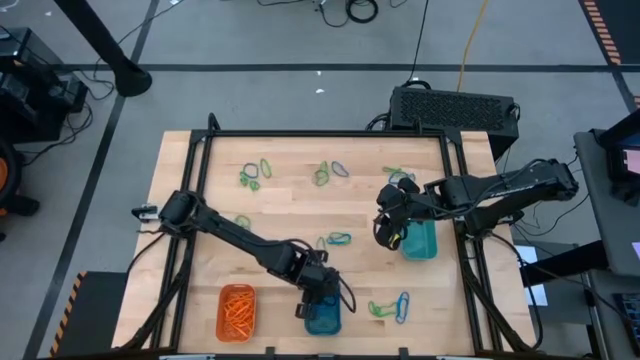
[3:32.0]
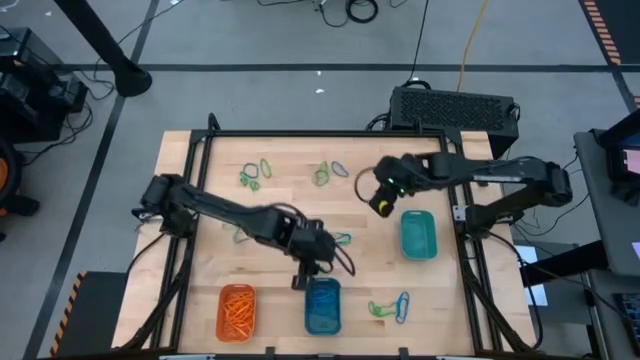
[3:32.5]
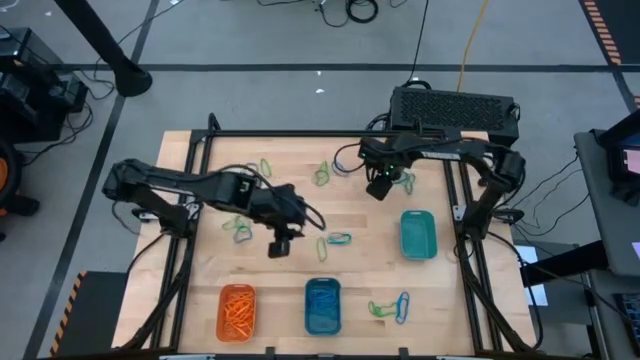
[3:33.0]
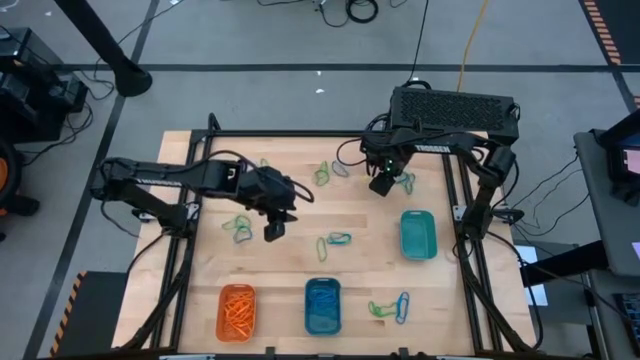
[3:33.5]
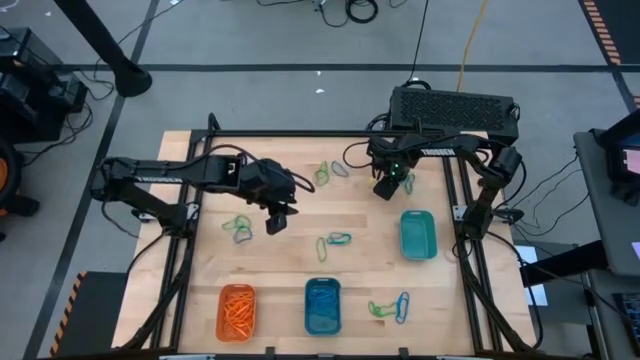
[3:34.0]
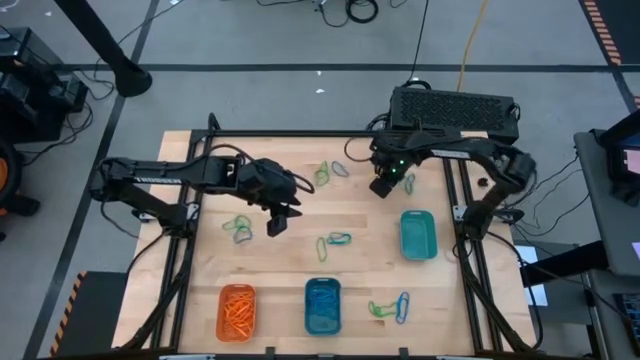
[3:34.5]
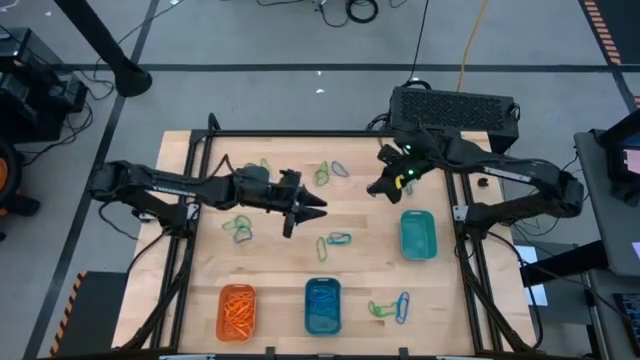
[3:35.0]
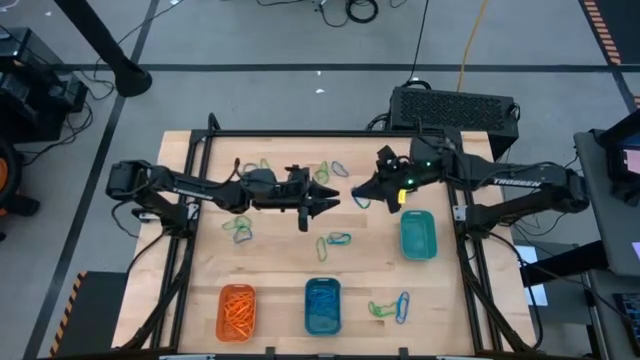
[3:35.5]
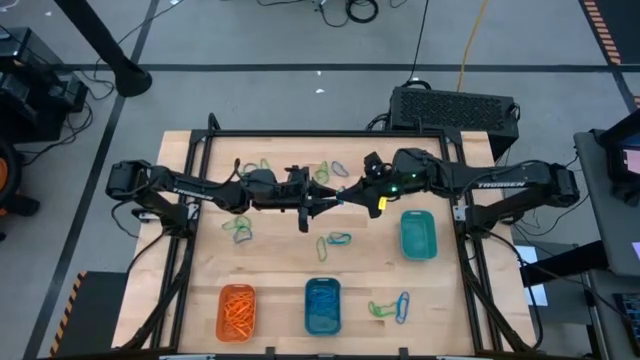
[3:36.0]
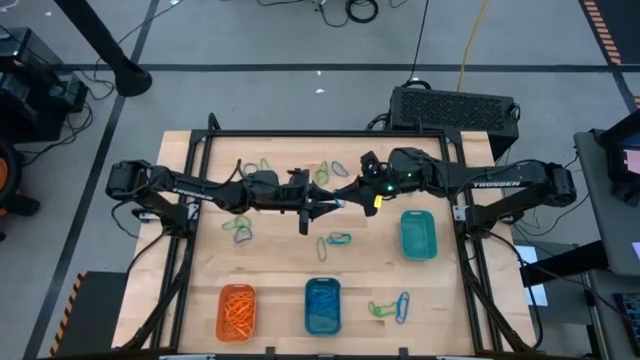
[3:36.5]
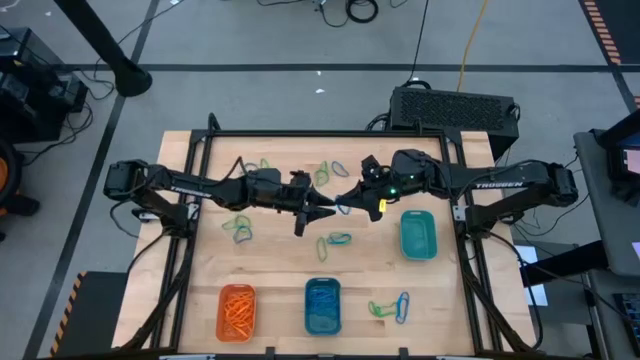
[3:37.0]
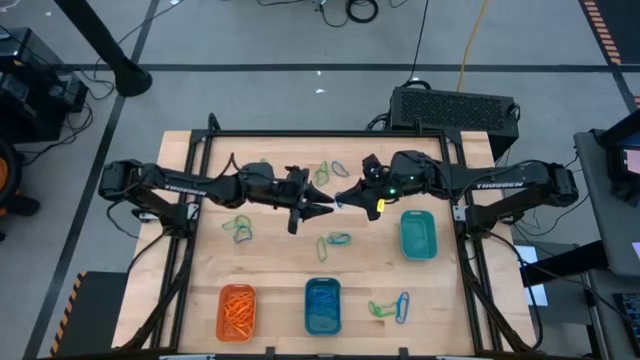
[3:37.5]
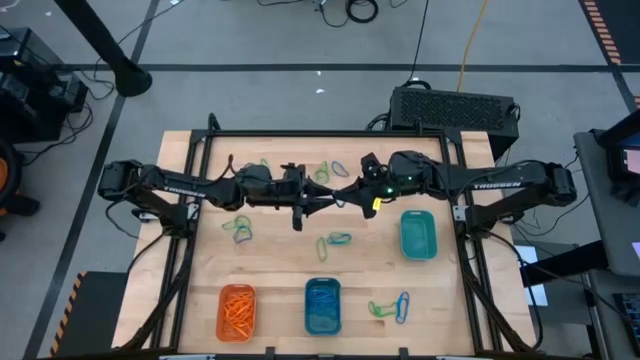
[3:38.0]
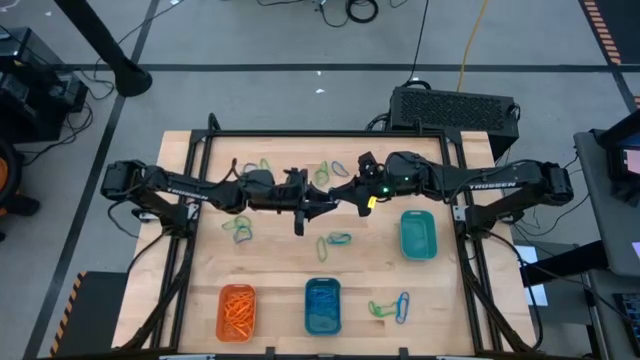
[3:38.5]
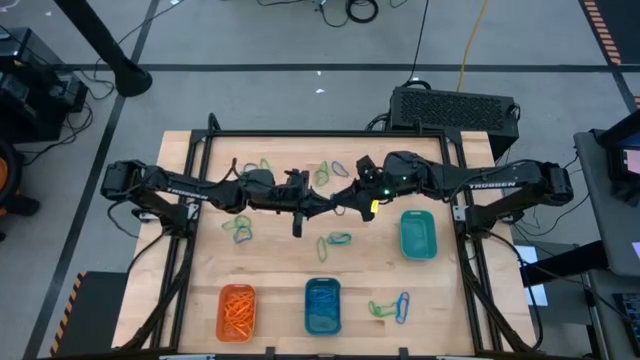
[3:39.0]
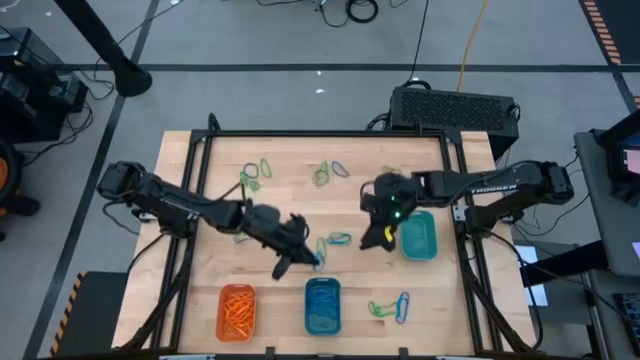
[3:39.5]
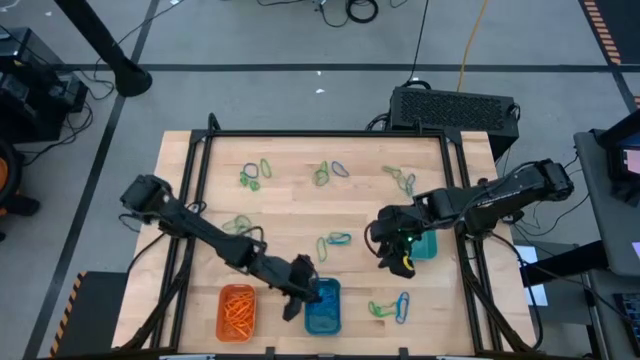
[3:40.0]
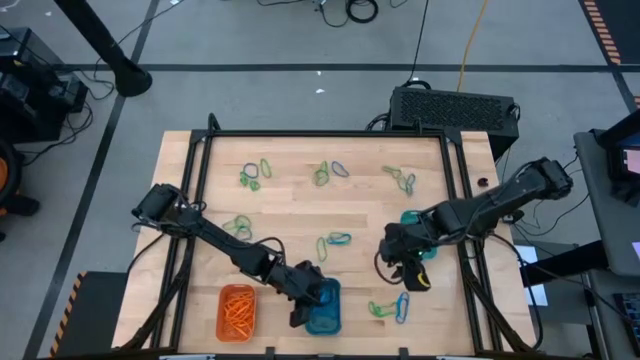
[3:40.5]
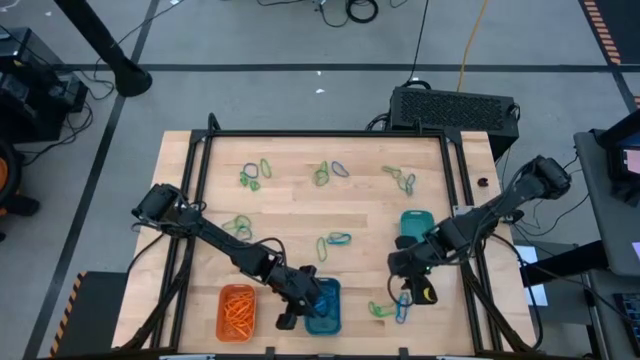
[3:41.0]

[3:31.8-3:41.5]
Task: Sort rubber bands into baskets
Put the blue rubber band into the blue bin

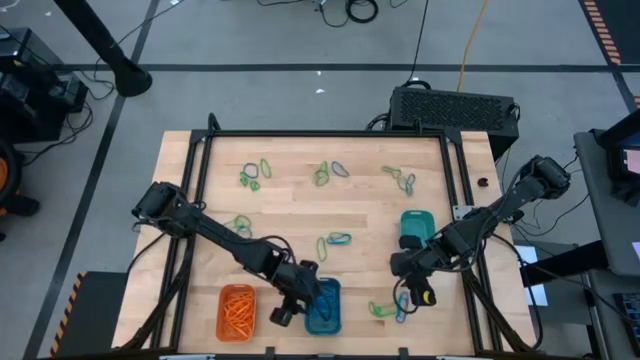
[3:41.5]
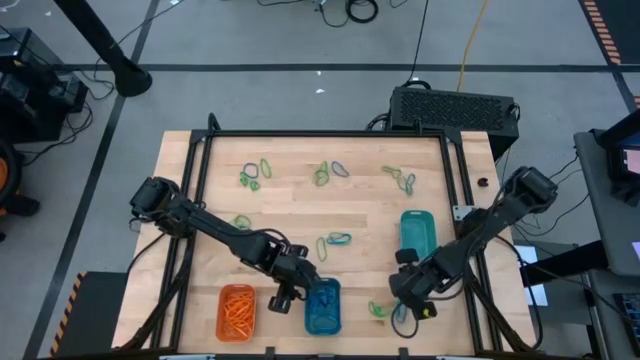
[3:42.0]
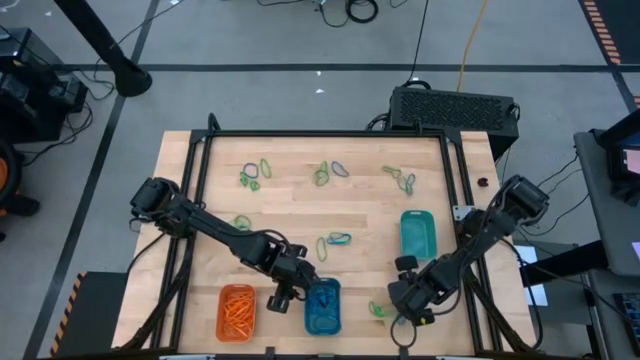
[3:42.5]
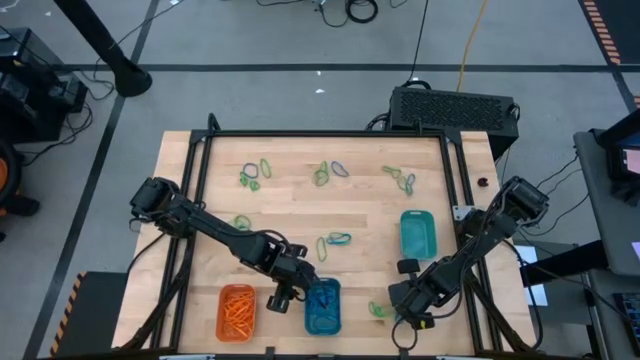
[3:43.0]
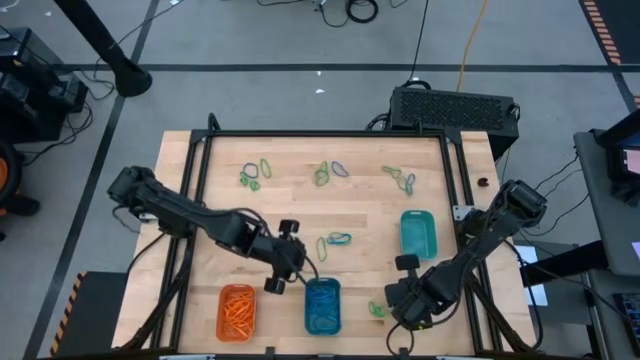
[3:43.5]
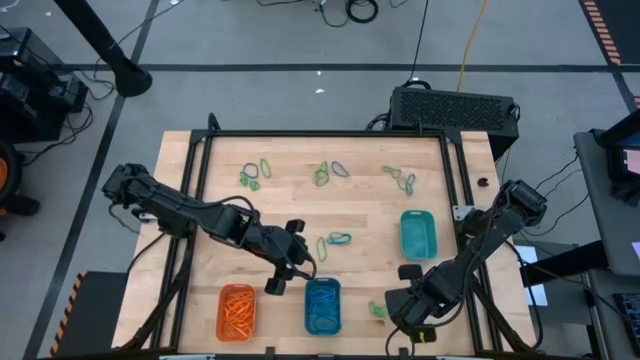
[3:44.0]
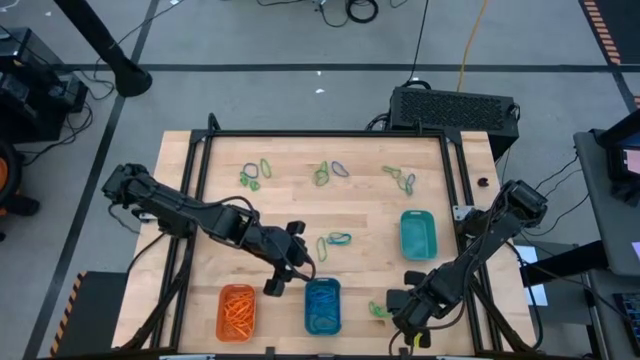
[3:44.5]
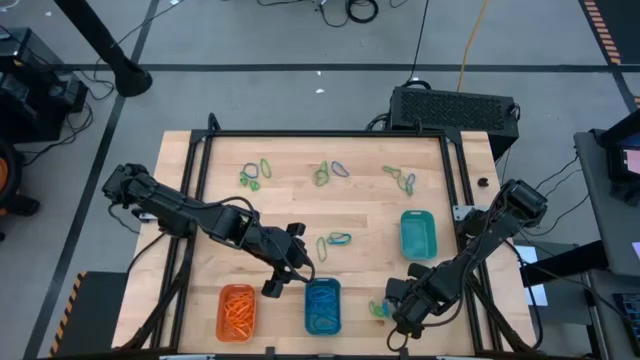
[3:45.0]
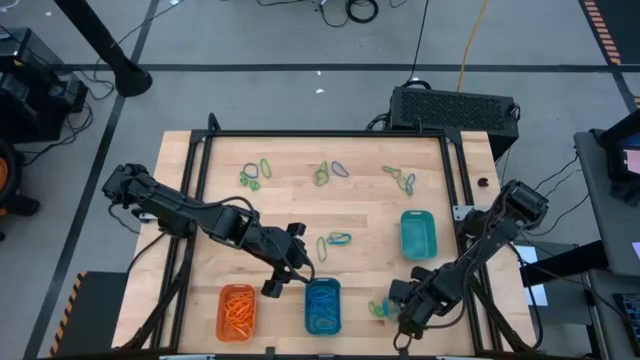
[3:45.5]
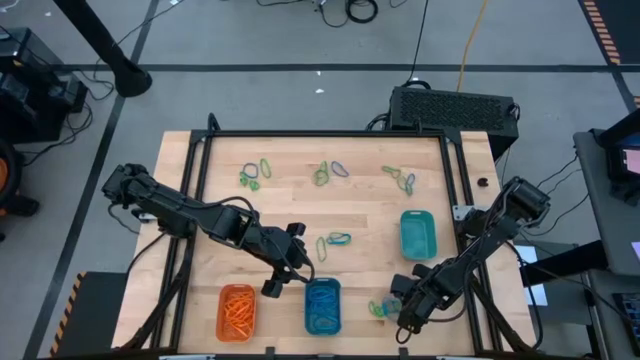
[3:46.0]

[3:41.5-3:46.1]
Put the blue rubber band into the blue bin

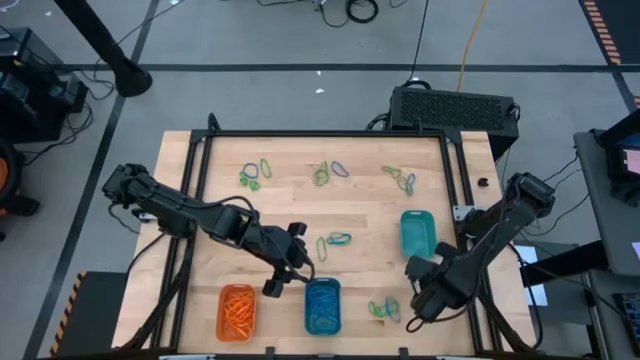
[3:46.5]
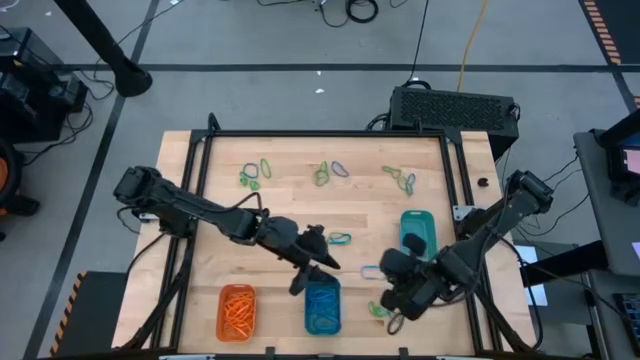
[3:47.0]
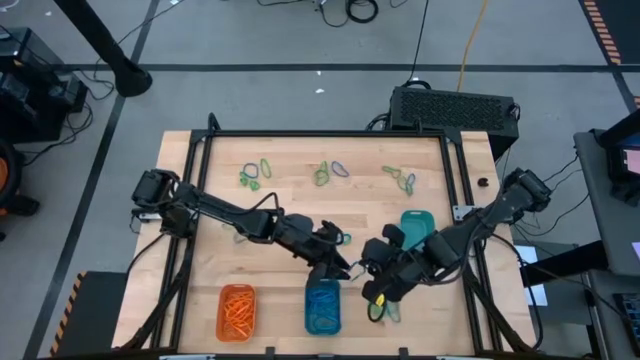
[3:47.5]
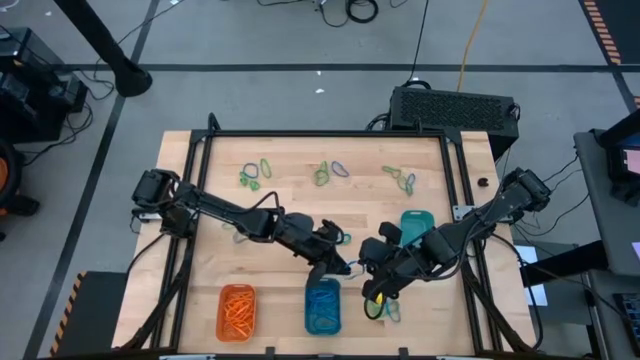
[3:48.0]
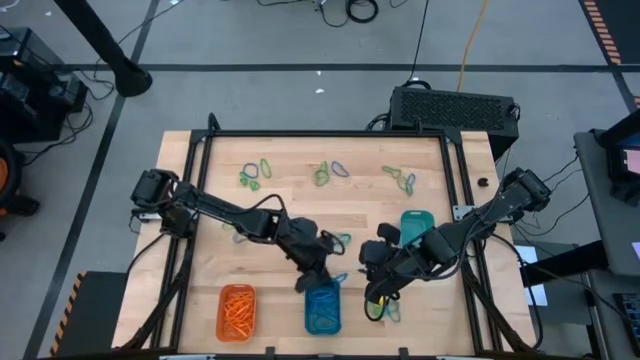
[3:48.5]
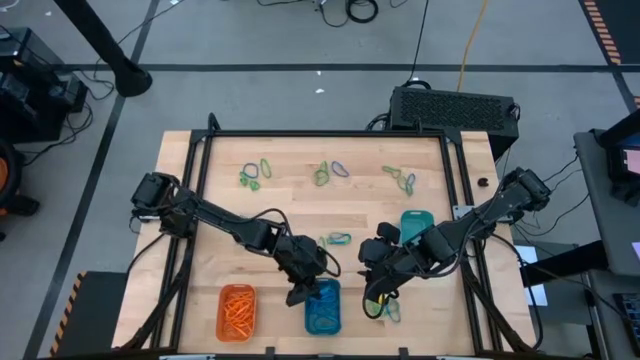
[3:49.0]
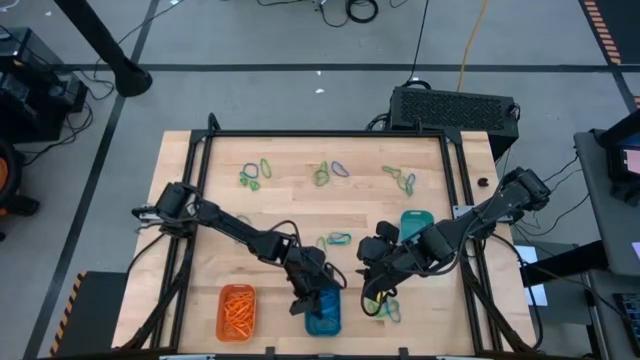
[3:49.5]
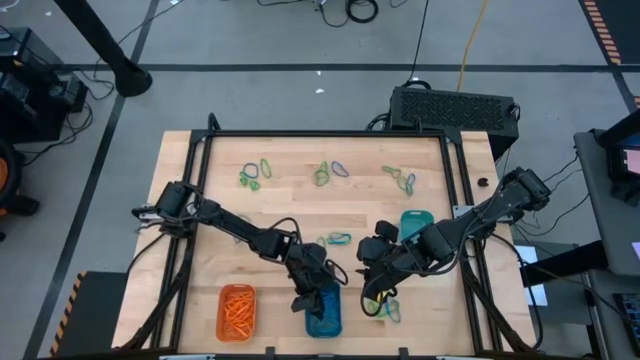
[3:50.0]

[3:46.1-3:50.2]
Put the blue rubber band into the blue bin

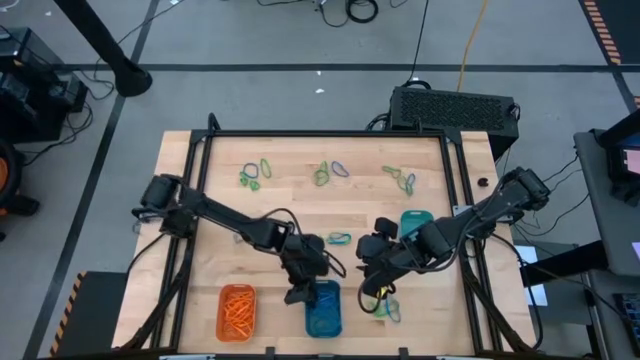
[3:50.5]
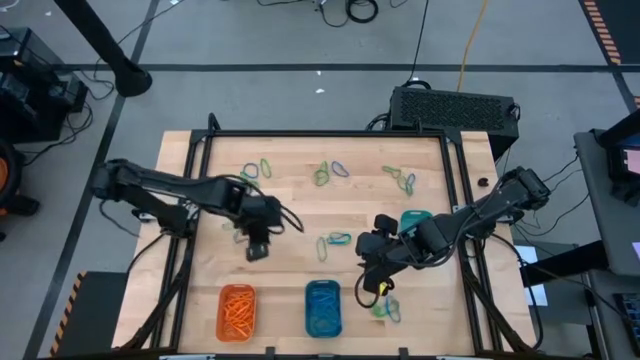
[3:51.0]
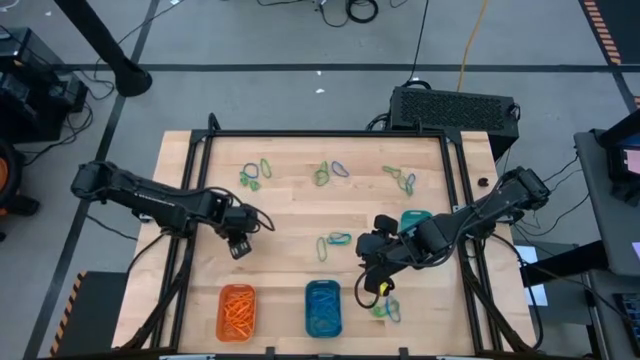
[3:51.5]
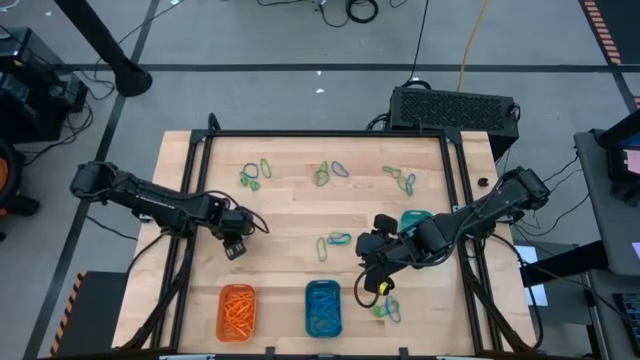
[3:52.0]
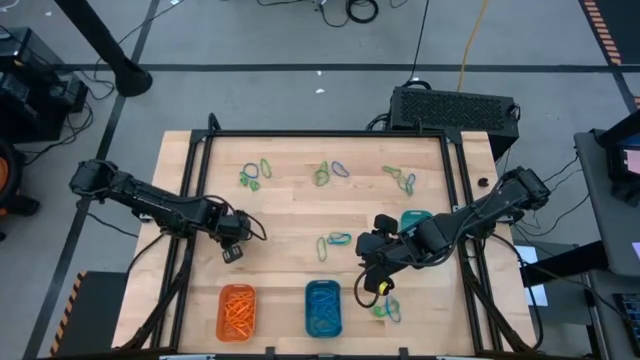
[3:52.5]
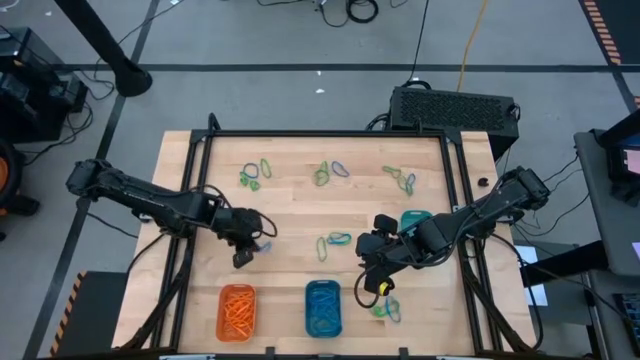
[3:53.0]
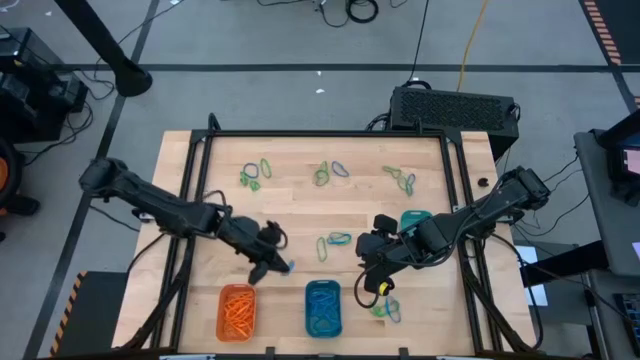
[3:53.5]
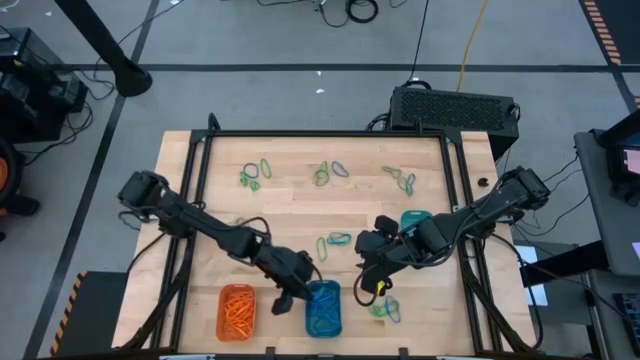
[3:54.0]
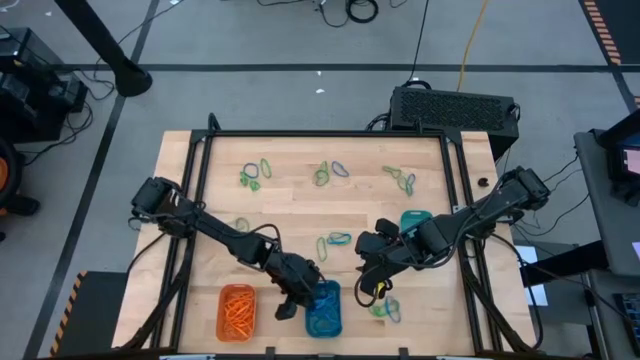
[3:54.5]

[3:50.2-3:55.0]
Put the blue rubber band into the blue bin
